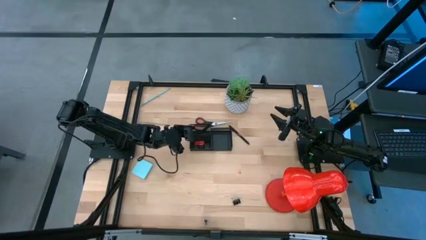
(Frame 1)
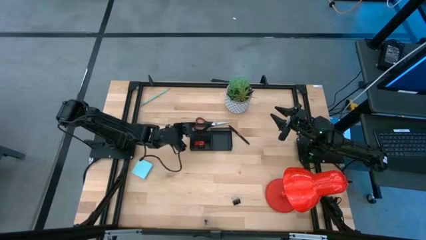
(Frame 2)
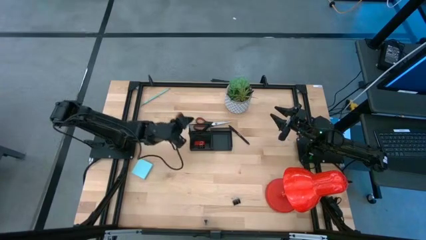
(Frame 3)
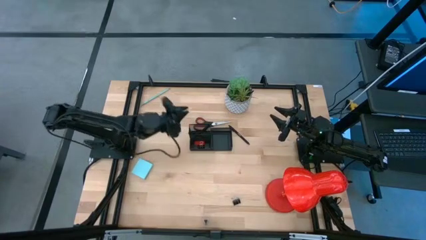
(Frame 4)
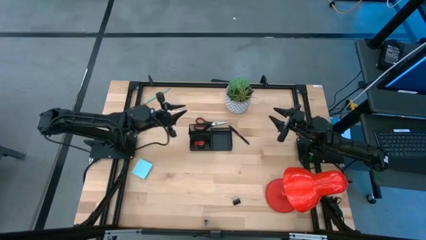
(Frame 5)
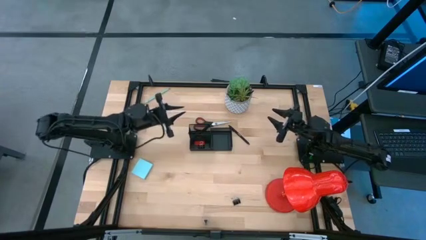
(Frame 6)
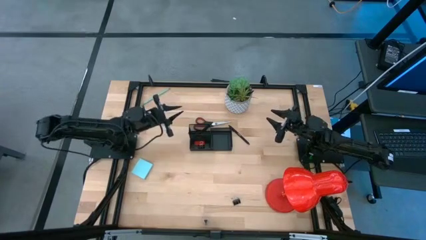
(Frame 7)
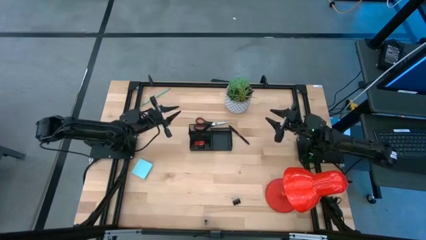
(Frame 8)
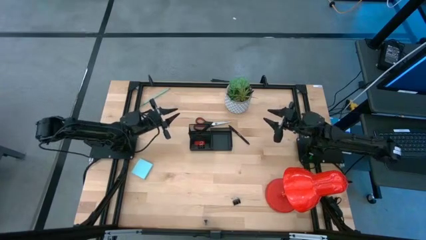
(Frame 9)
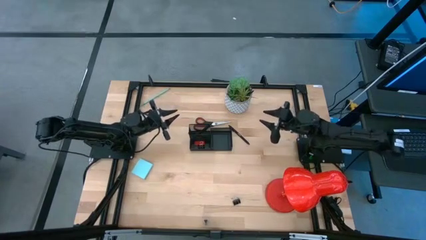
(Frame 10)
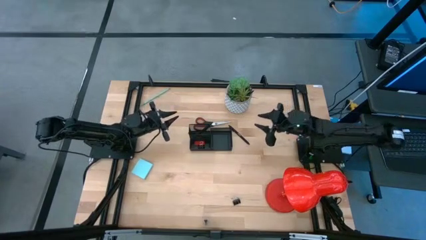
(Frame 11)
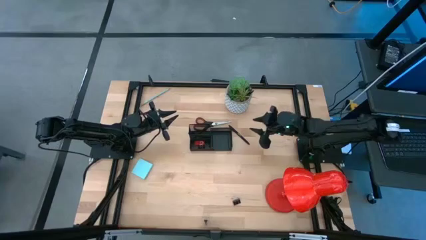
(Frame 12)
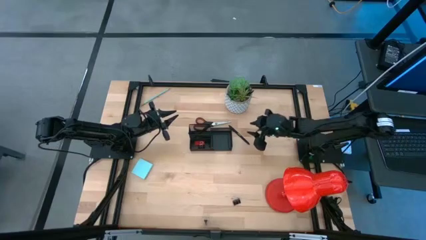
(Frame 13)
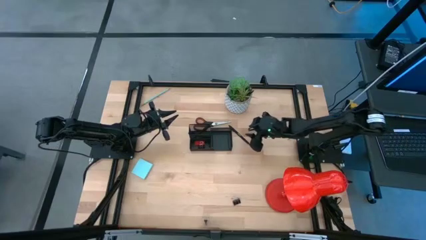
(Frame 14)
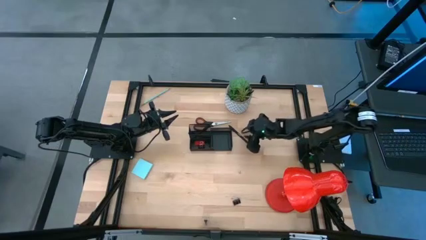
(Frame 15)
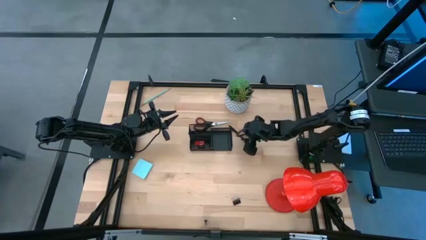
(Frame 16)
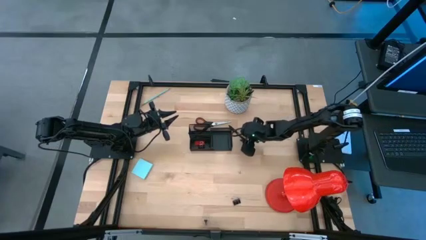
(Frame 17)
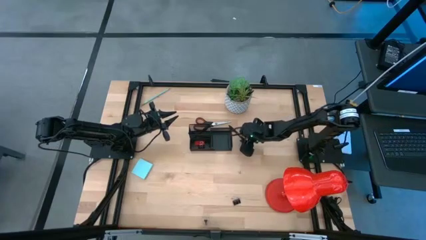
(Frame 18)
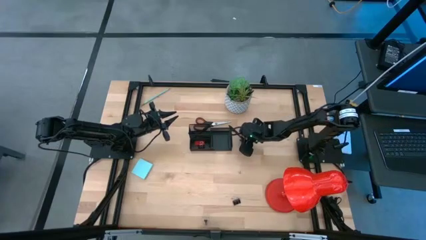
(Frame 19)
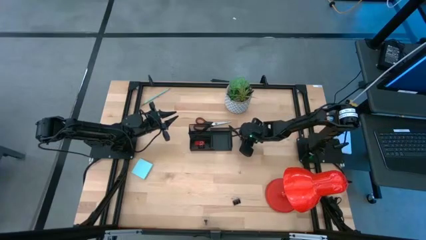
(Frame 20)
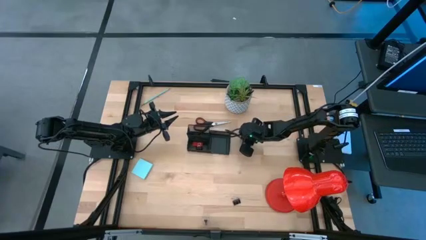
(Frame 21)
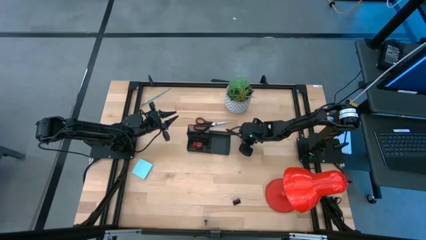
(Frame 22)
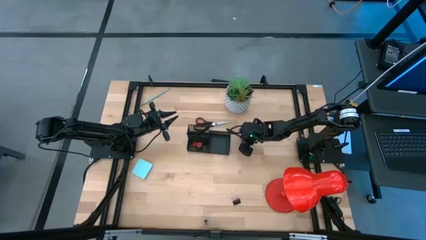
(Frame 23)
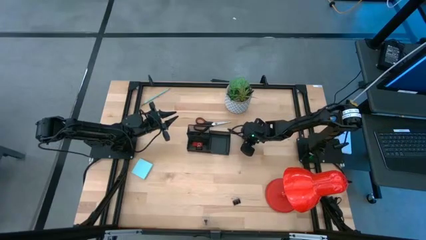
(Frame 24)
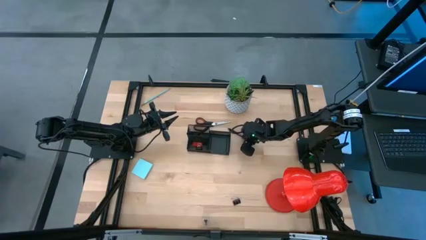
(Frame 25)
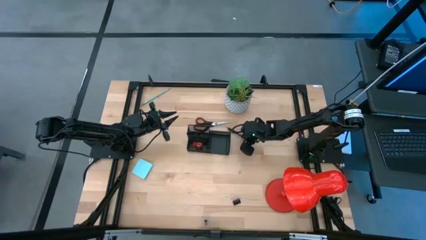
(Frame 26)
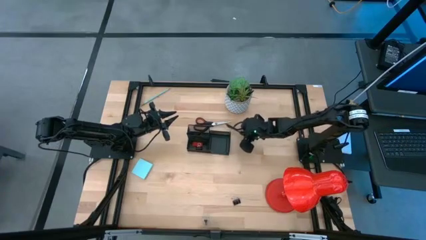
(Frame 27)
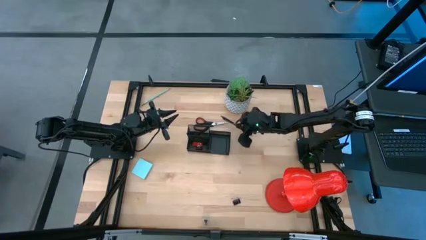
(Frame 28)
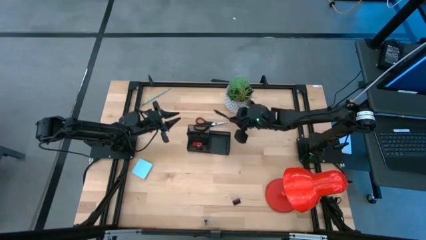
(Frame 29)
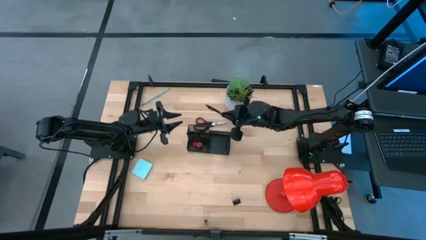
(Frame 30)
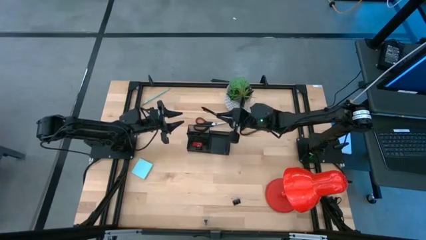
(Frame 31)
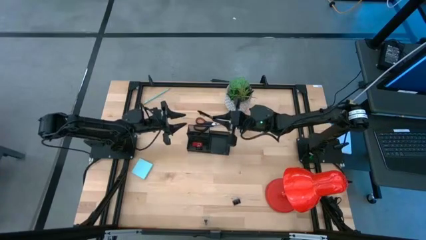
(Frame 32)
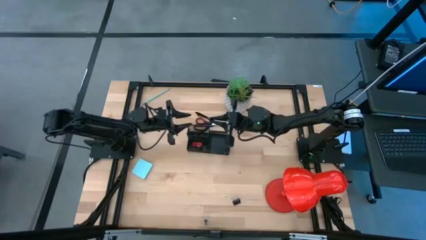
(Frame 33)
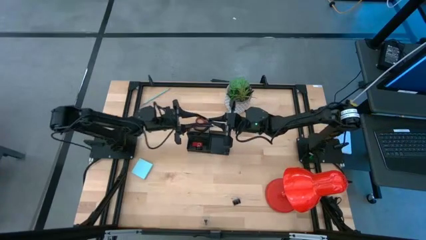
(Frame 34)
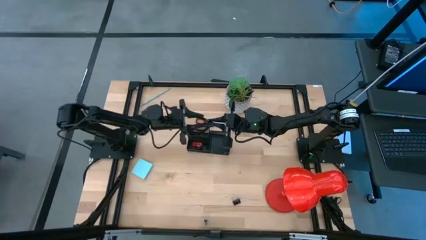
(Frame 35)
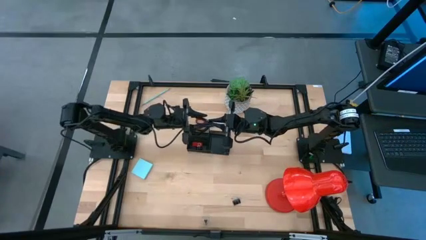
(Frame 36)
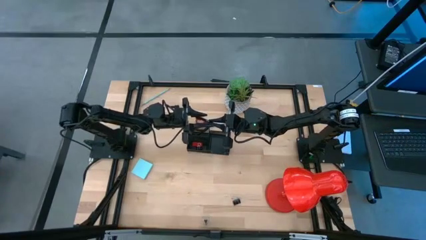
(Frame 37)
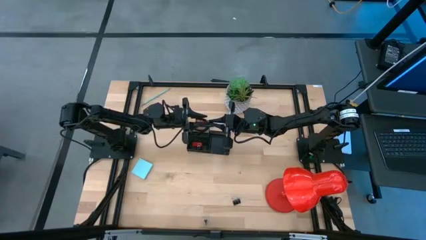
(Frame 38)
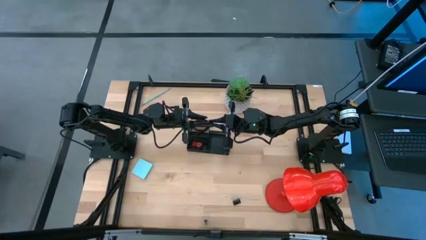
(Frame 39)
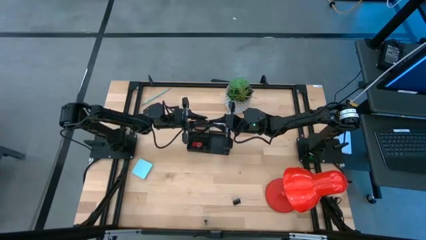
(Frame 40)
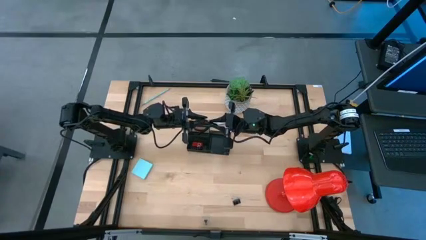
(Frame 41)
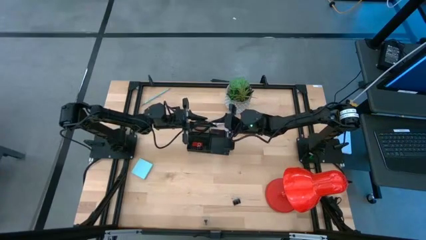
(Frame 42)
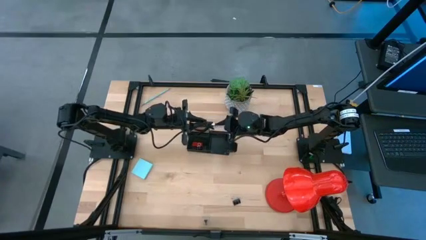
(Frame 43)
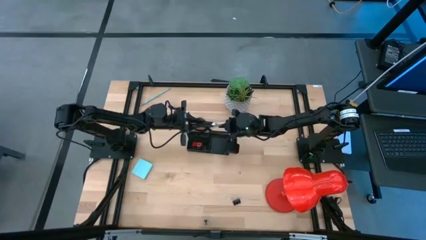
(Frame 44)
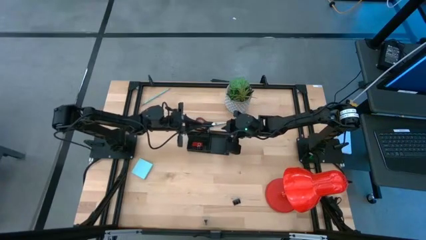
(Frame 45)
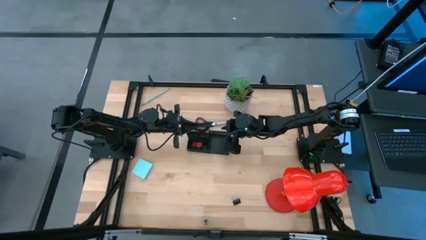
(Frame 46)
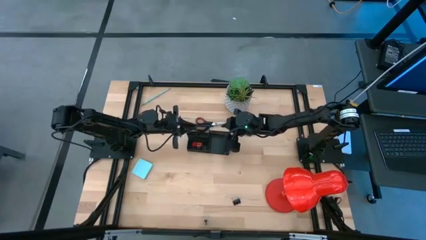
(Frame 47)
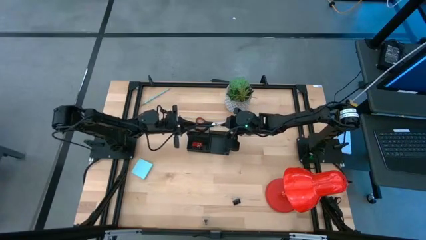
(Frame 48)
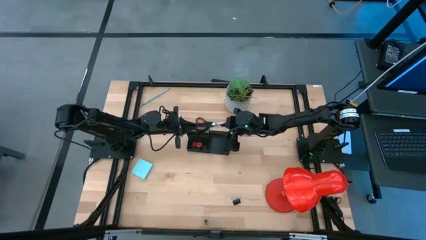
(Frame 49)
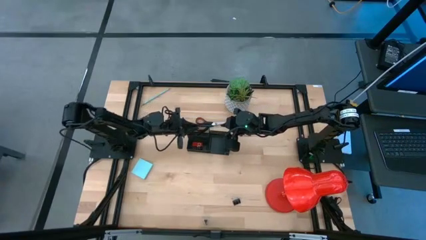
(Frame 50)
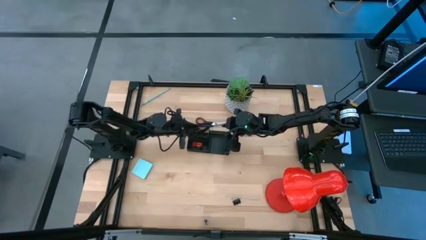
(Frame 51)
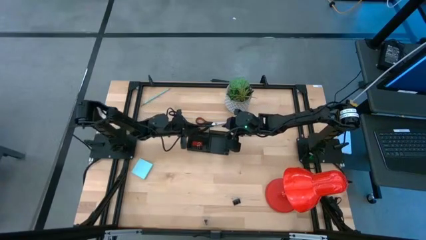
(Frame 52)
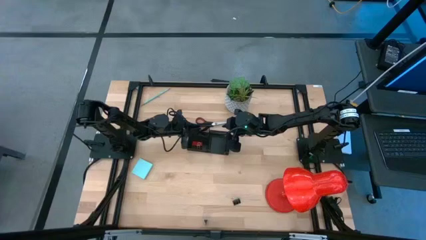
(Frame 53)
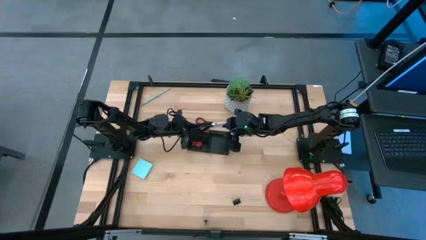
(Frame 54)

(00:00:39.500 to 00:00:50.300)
Task: Pick and place office supplies into organizer
Put the pen into the top left section of the desk organizer

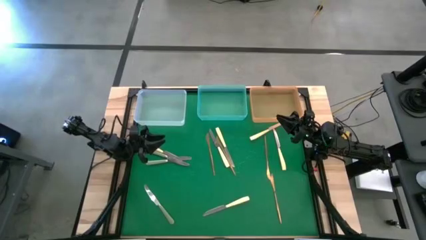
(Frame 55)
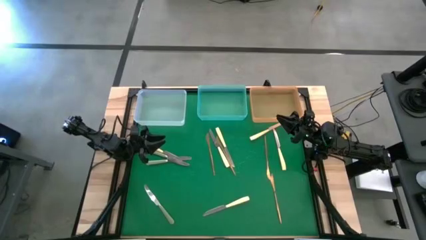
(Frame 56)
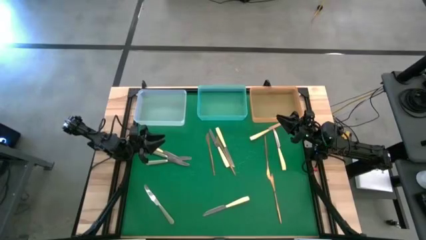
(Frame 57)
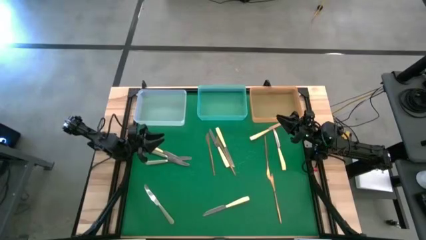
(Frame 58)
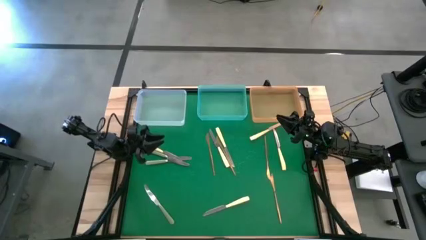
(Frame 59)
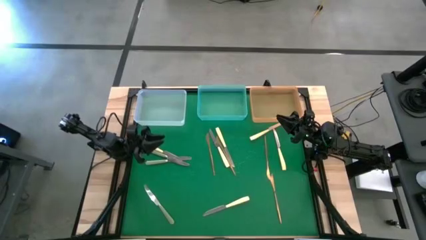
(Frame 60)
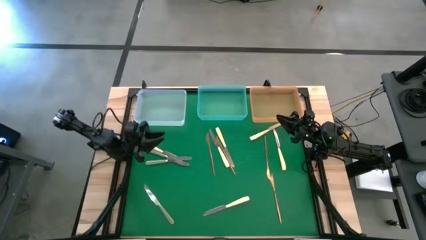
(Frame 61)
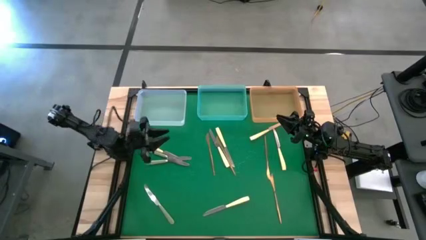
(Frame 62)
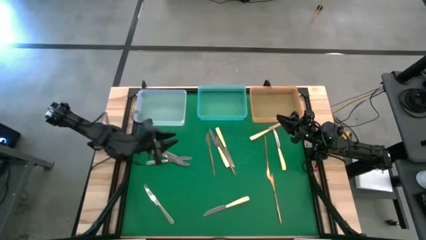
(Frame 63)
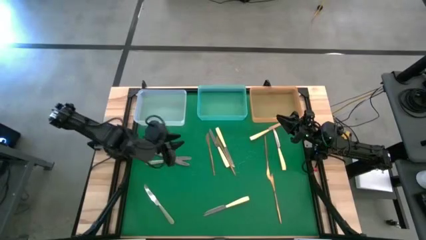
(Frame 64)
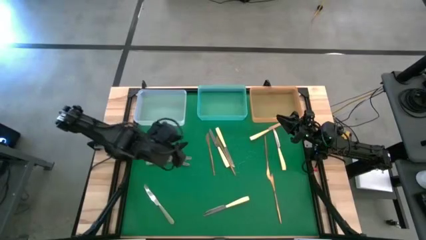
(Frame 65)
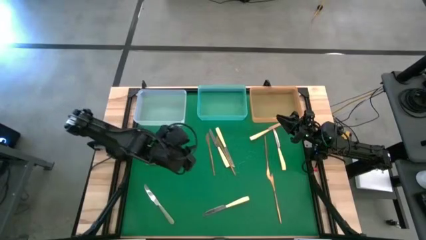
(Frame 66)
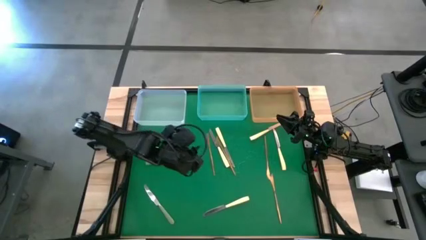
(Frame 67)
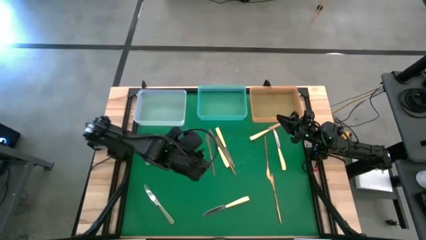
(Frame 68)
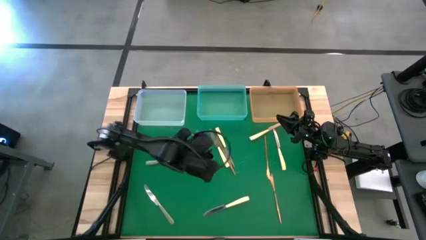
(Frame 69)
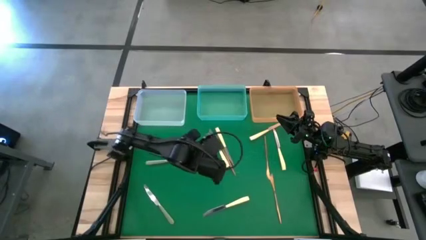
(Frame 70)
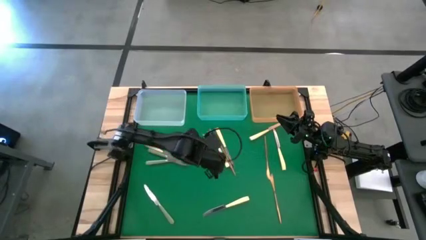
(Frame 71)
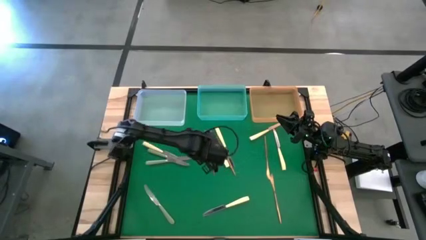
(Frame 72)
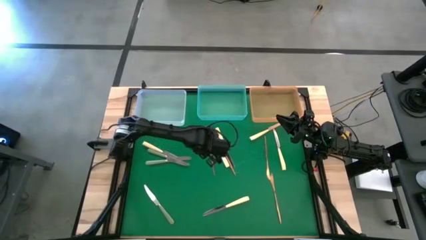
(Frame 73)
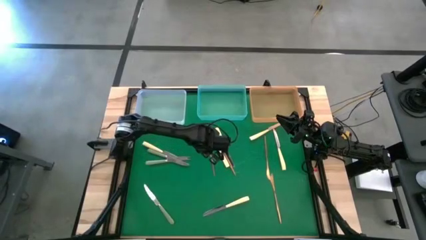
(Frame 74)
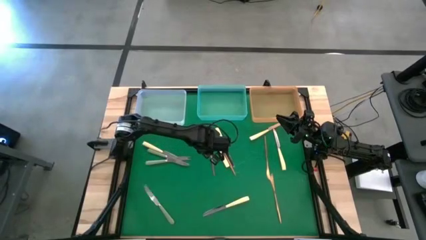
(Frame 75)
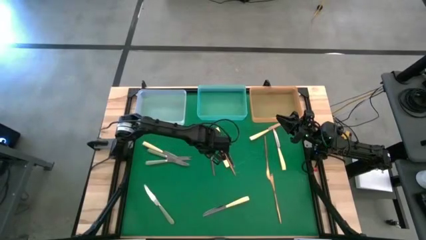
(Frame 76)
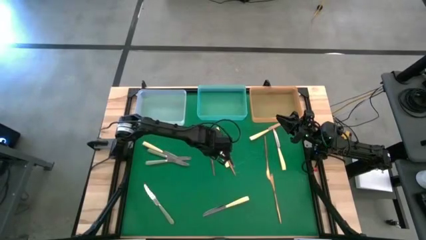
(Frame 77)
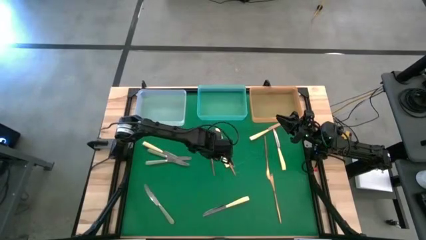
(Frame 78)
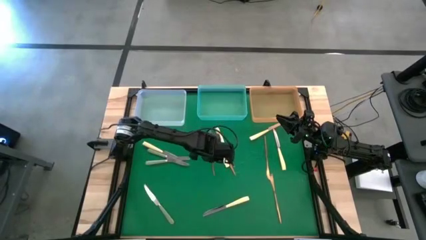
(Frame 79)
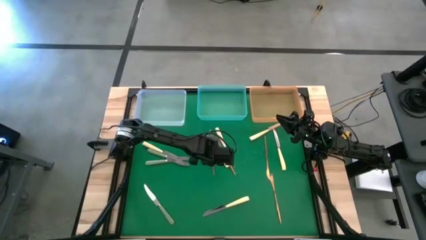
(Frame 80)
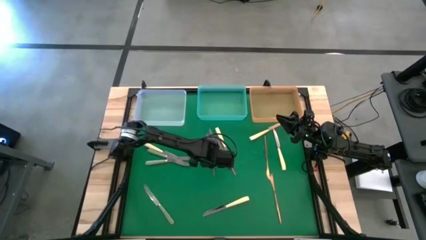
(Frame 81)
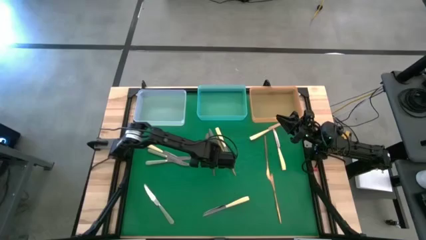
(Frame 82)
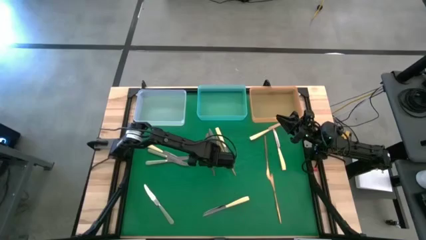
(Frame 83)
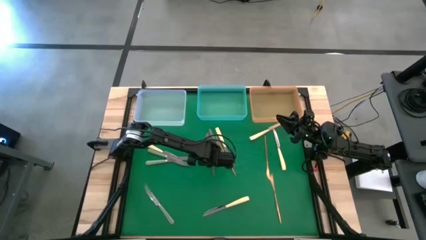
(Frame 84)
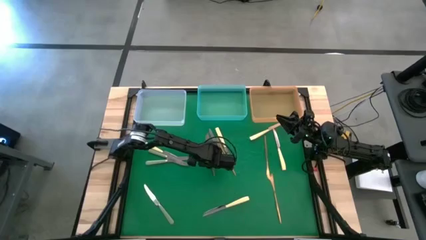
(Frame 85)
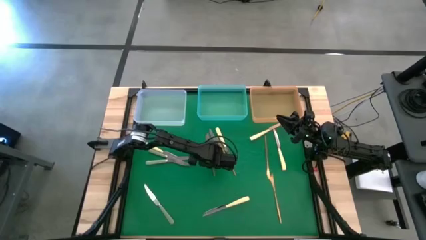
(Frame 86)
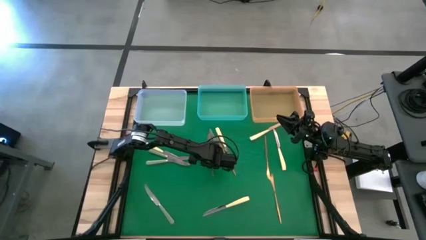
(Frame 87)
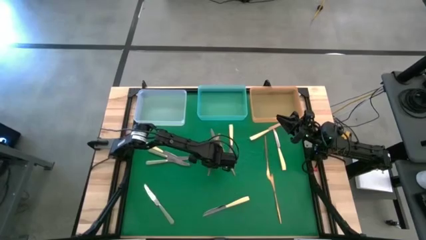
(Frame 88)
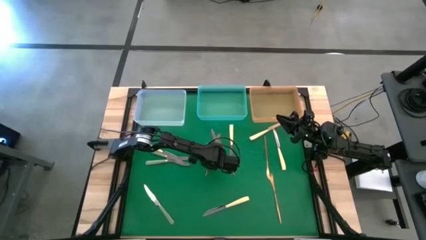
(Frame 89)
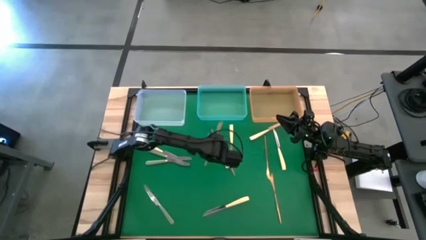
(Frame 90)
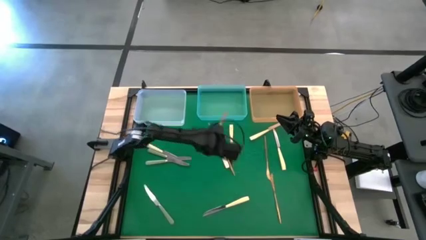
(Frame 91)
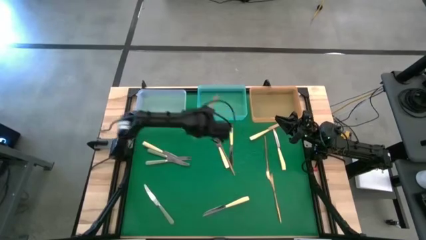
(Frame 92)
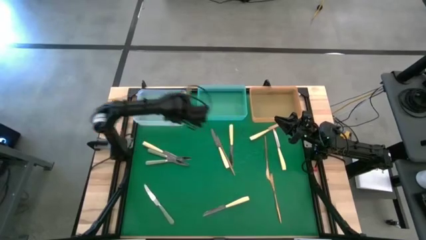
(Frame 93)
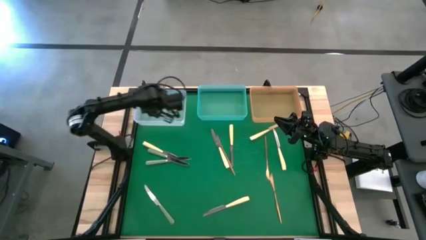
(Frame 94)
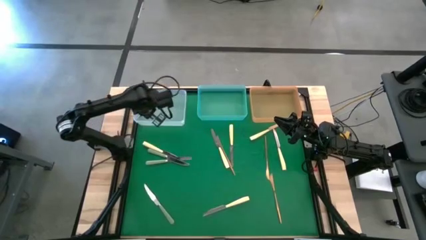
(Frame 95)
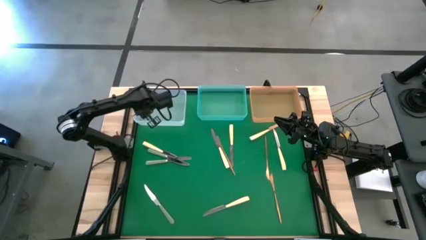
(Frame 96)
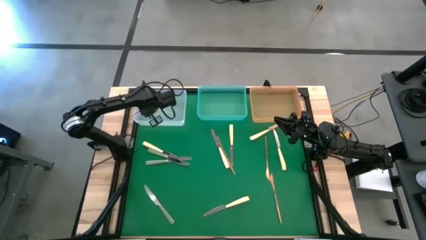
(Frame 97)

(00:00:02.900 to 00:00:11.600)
Task: Sort silverware by color (type)
Put the brown table knife into the white bin
